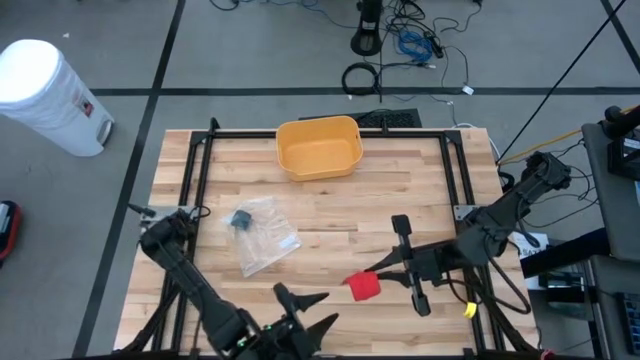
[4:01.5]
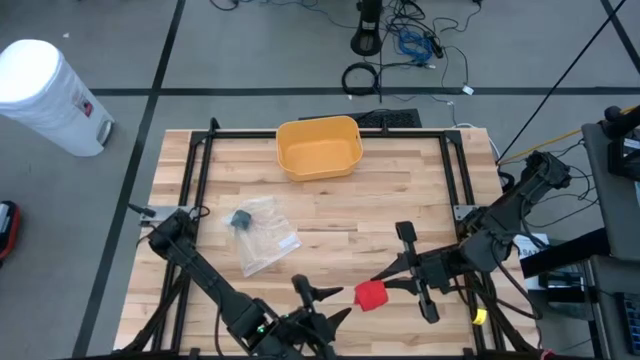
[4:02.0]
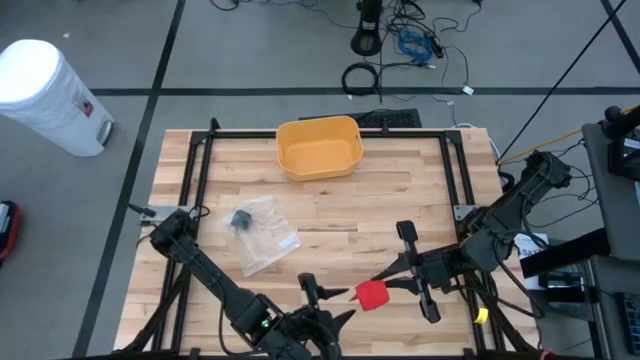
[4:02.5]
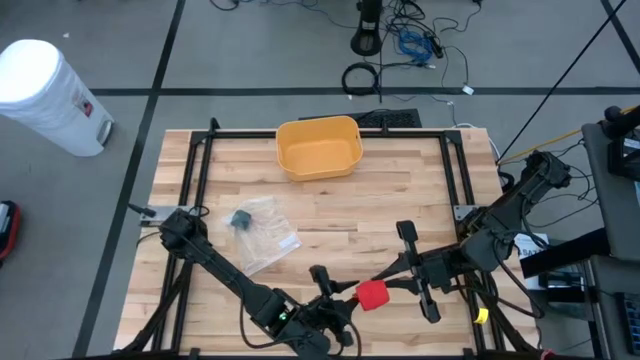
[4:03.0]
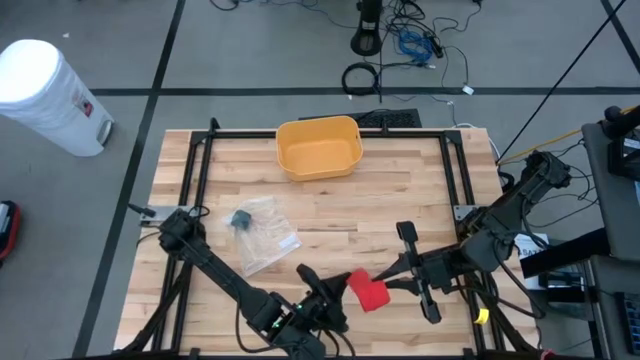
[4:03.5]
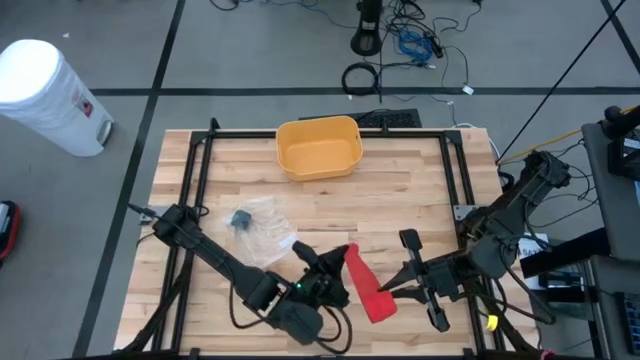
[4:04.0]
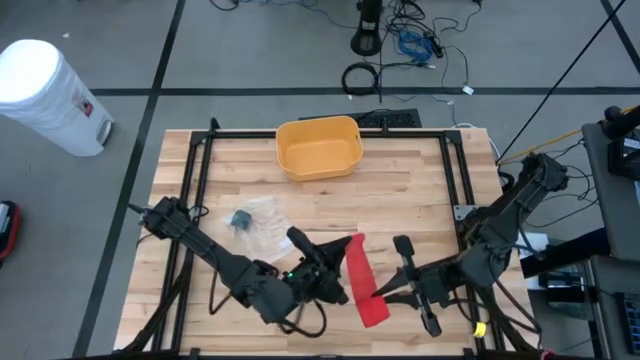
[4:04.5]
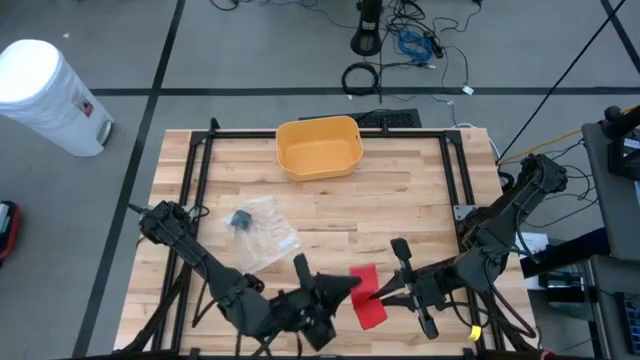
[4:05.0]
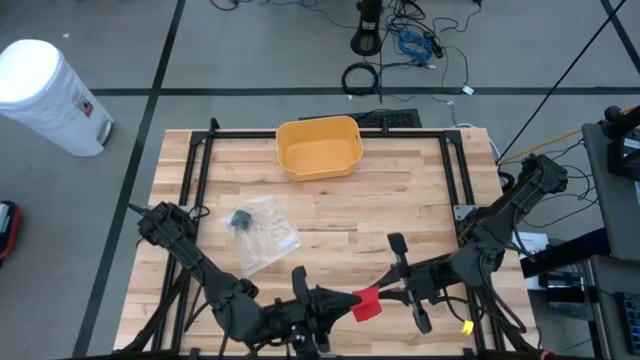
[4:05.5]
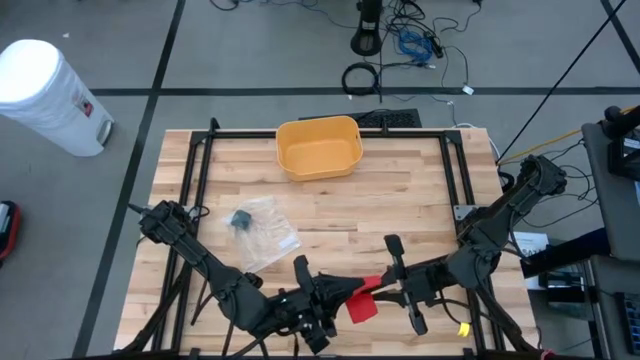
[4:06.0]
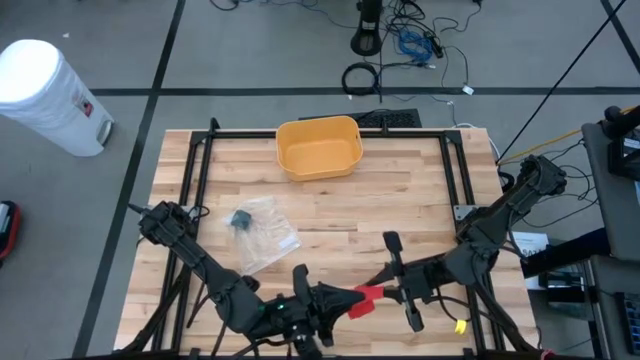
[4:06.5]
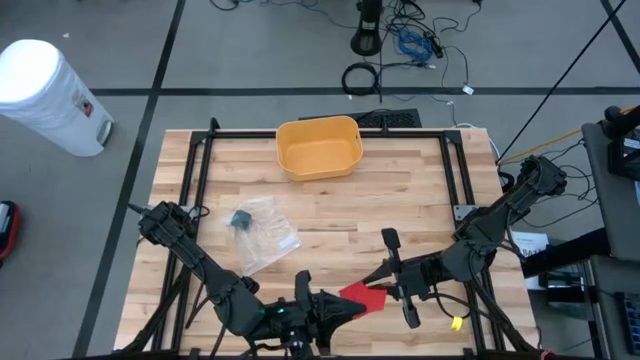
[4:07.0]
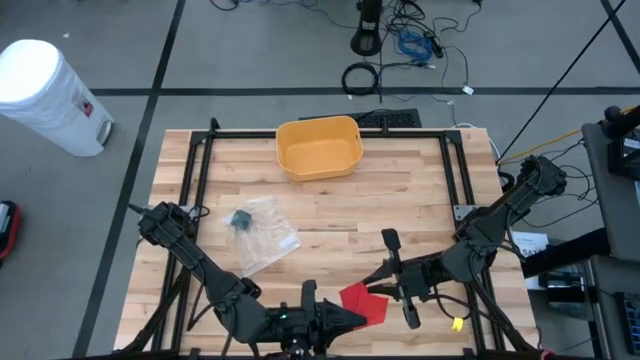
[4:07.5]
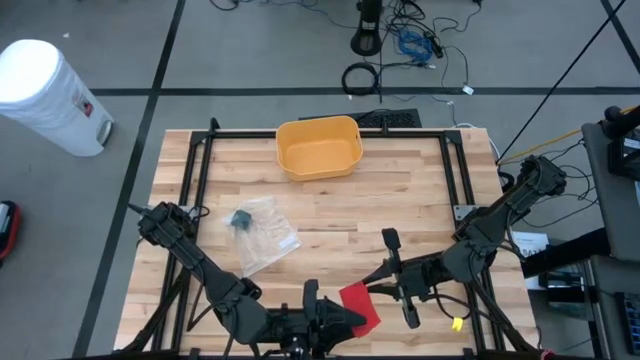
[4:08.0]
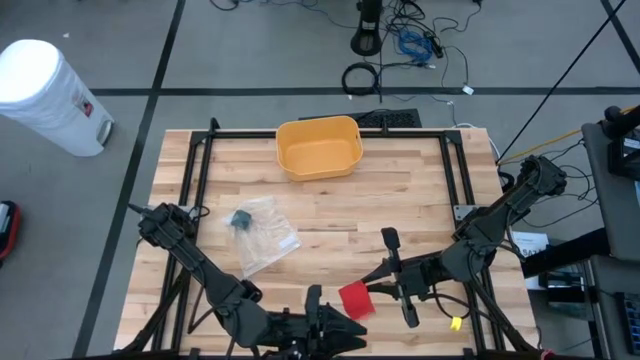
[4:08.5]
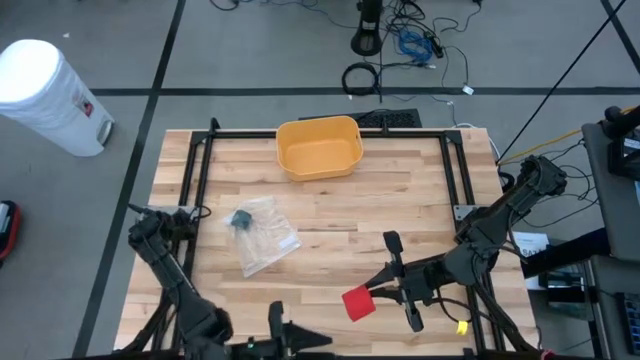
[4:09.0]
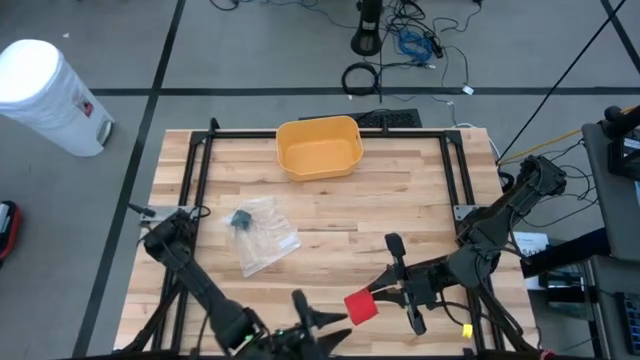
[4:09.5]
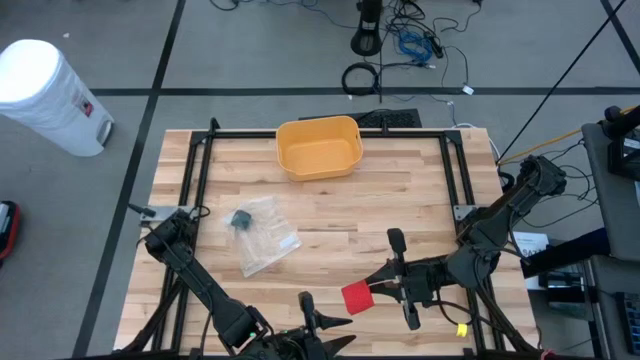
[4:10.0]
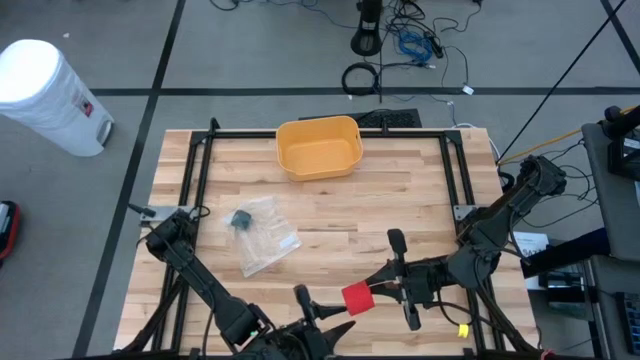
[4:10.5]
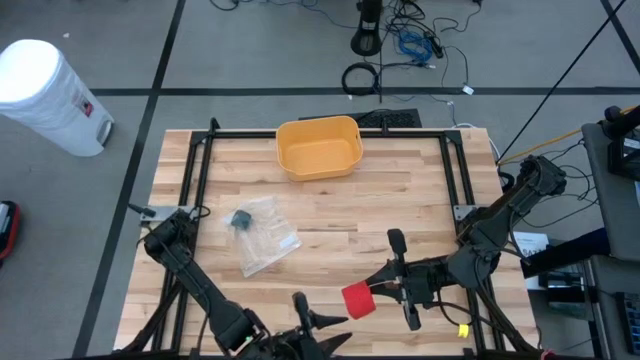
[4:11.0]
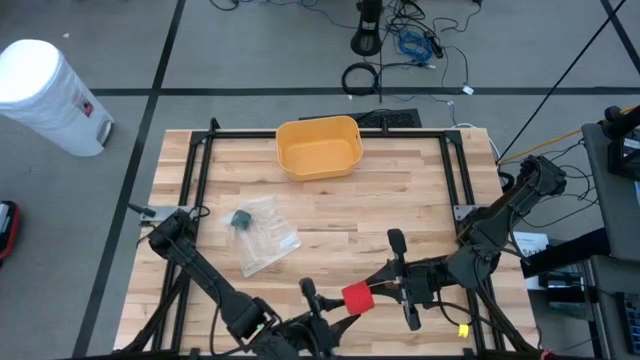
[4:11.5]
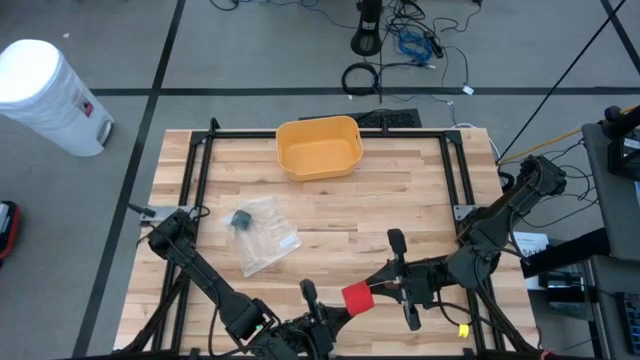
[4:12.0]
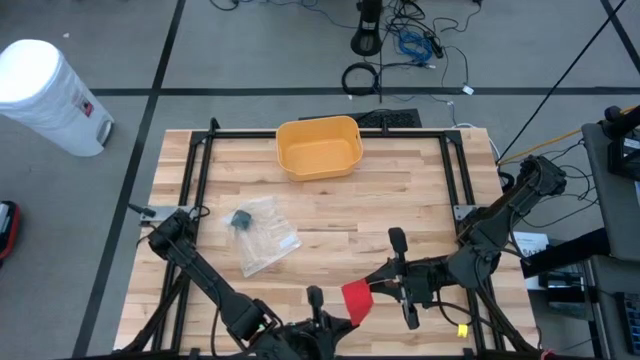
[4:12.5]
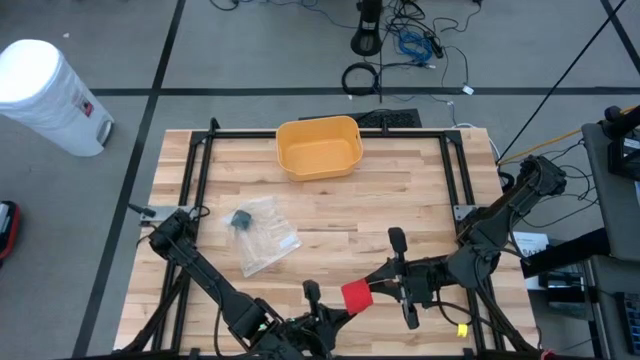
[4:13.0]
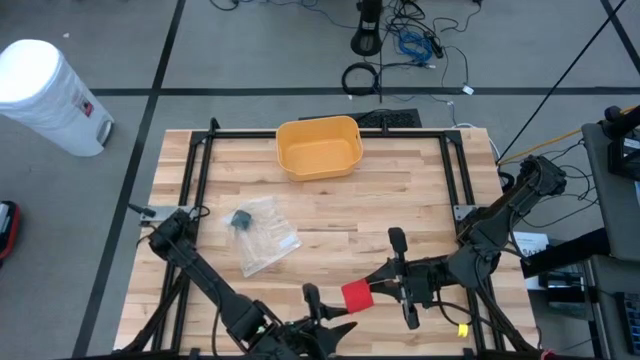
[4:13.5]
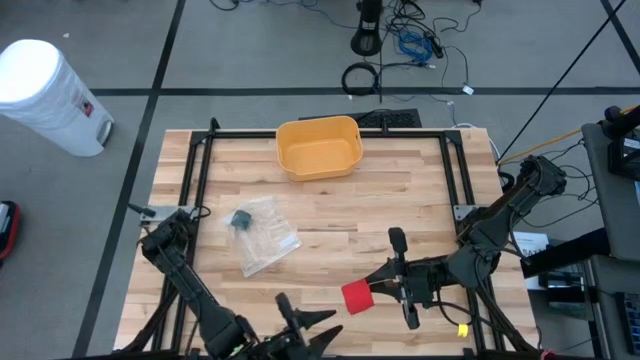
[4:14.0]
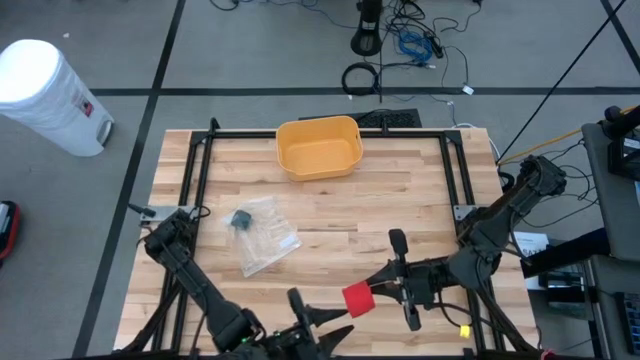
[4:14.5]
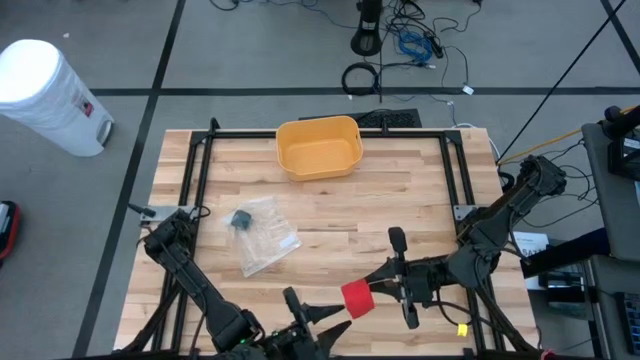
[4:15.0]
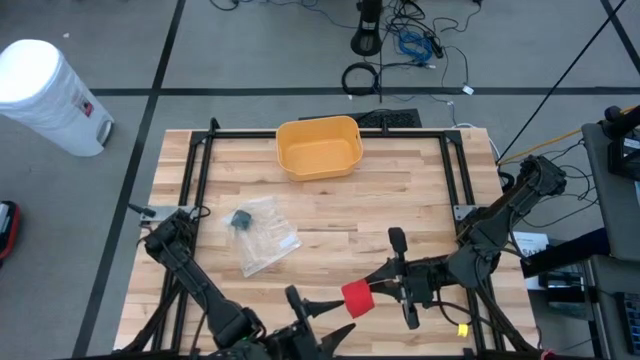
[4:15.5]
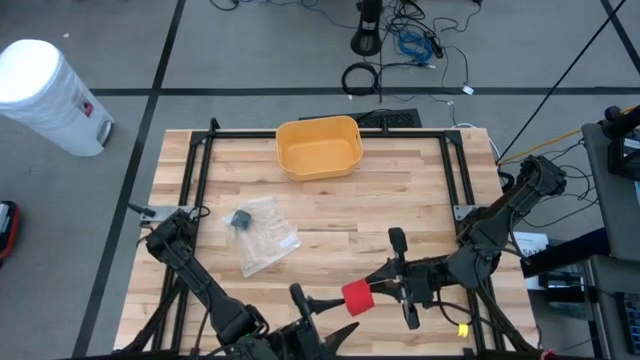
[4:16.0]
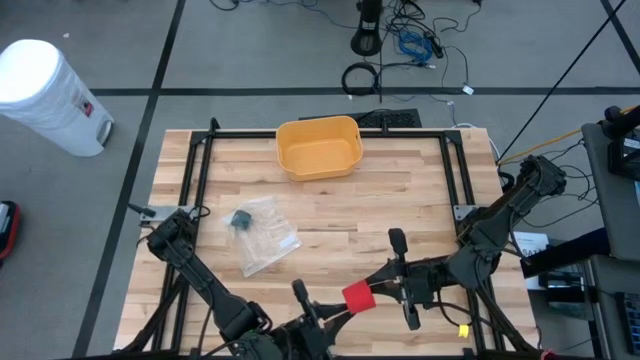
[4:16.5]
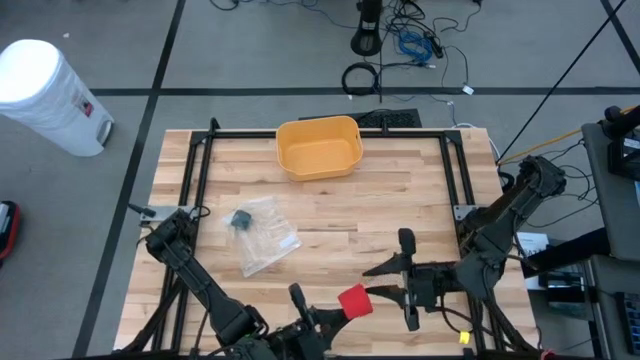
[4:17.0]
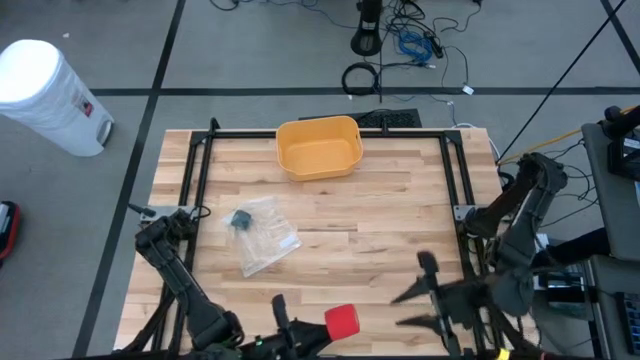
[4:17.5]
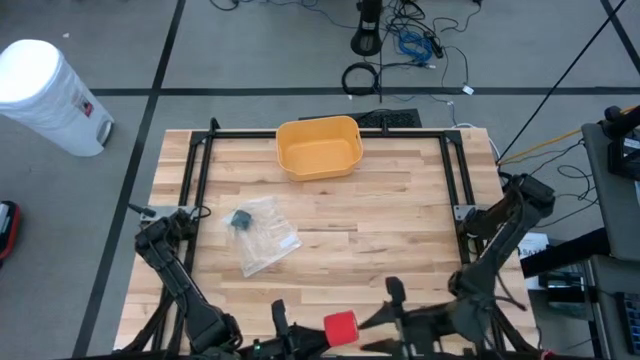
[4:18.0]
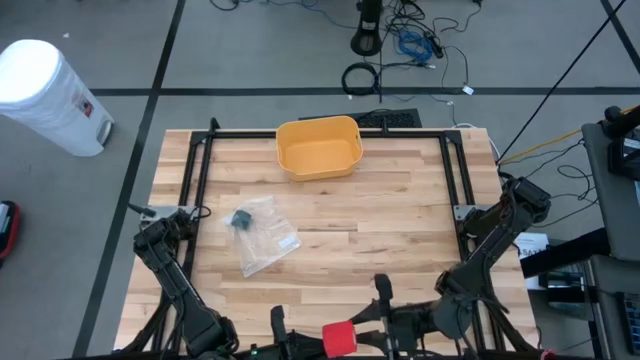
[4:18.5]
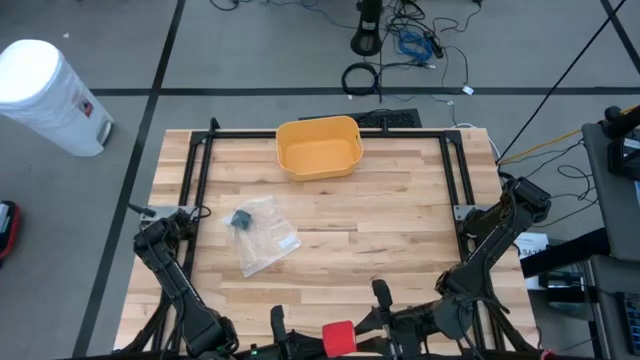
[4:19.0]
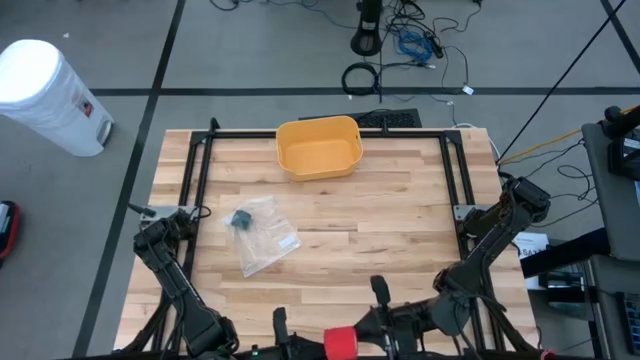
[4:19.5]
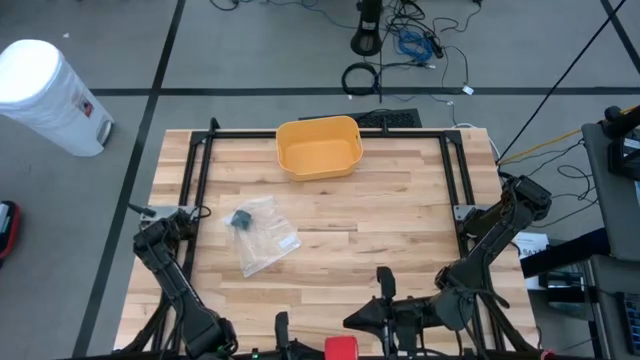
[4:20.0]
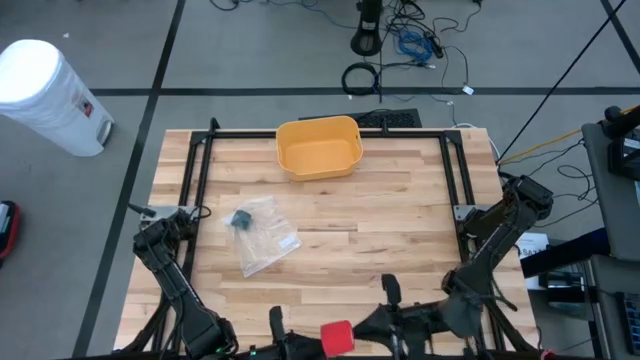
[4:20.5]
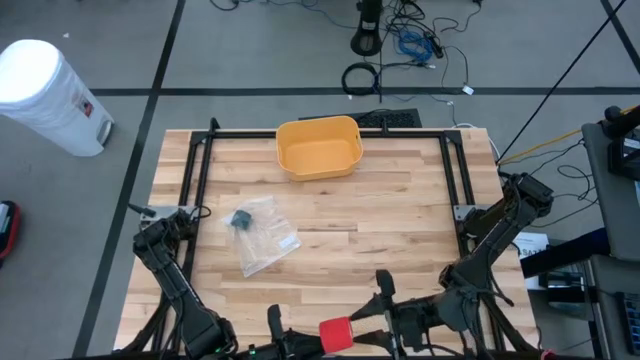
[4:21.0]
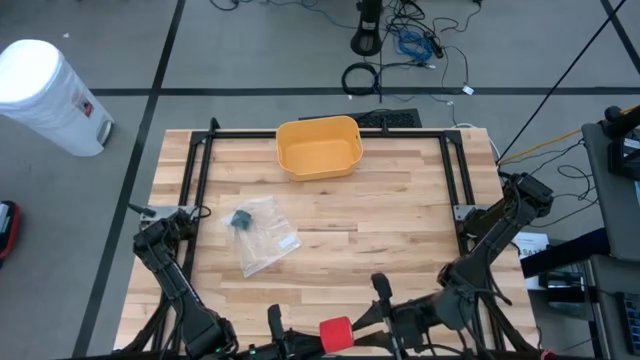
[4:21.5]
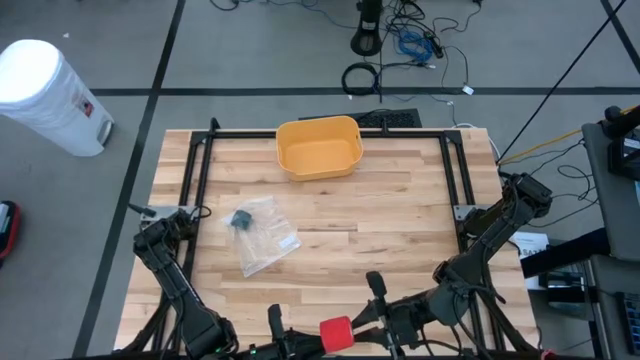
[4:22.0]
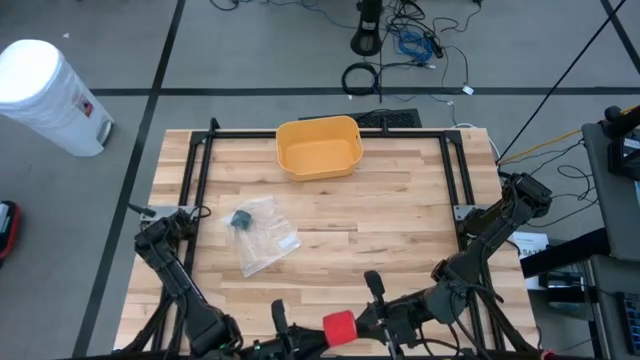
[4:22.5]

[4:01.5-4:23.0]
Task: Roll bandage
Roll the red bandage

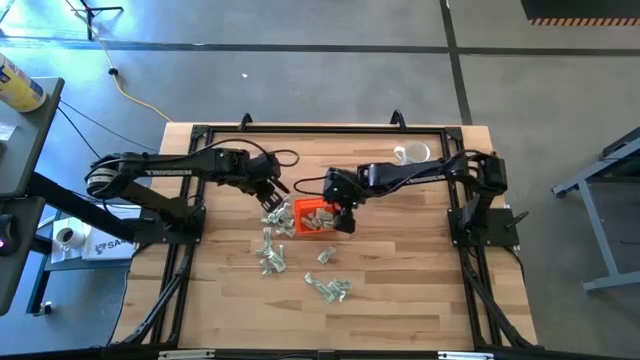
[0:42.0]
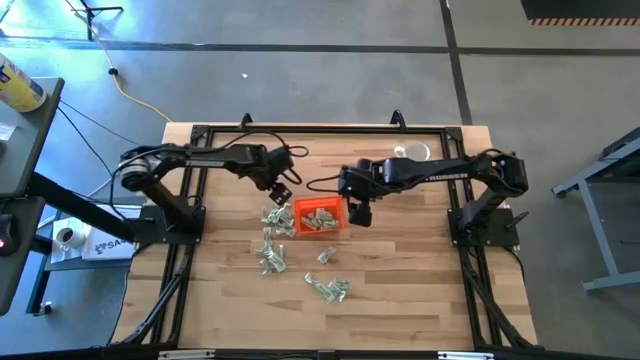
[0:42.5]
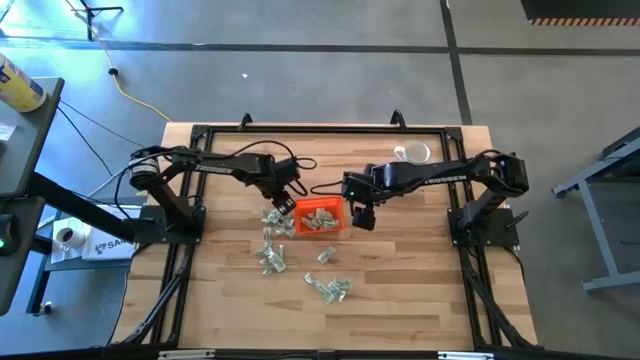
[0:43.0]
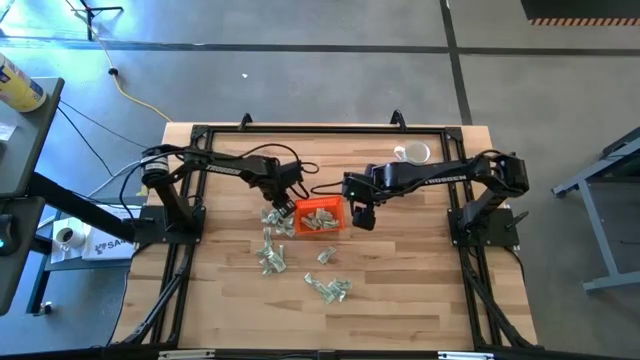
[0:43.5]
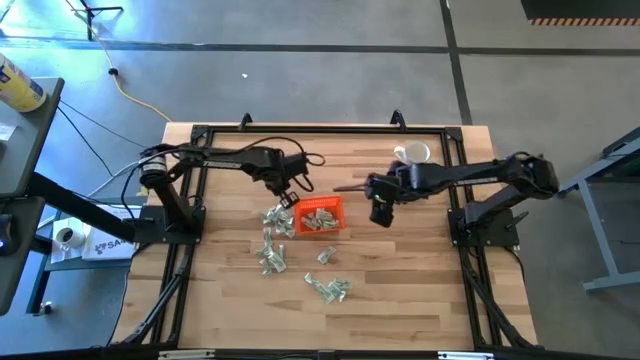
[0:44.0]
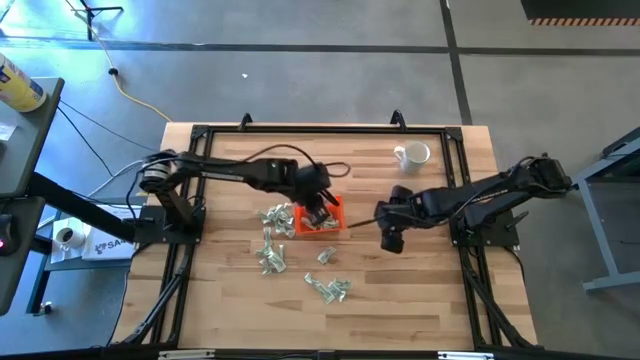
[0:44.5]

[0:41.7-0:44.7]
Task: Pick and place Stevia / Truvia into bins
Put the stevia packet into the orange bin
